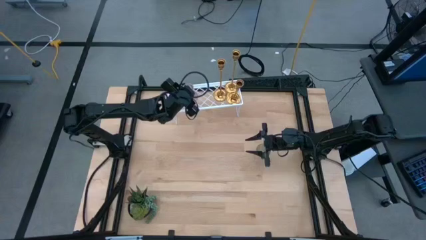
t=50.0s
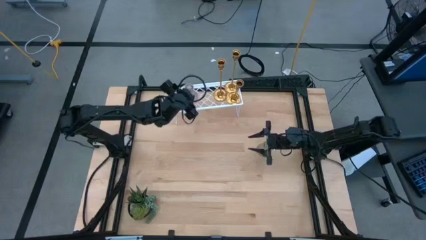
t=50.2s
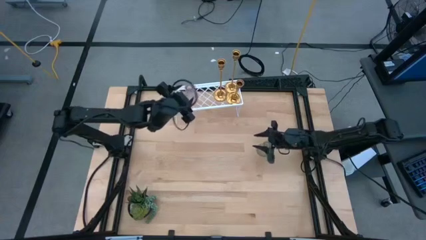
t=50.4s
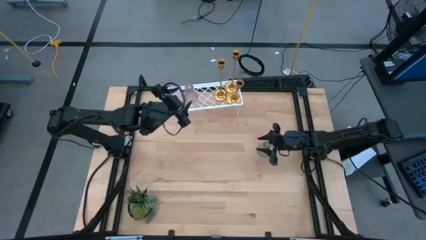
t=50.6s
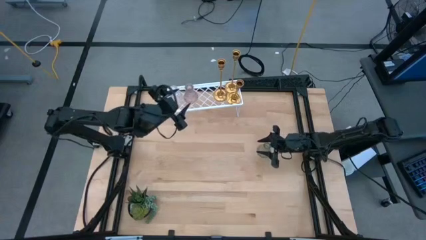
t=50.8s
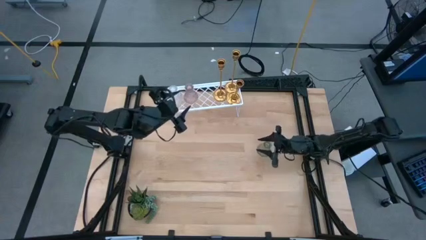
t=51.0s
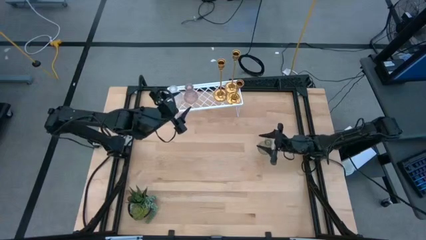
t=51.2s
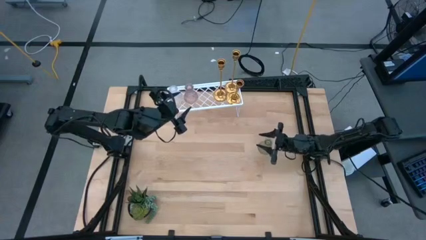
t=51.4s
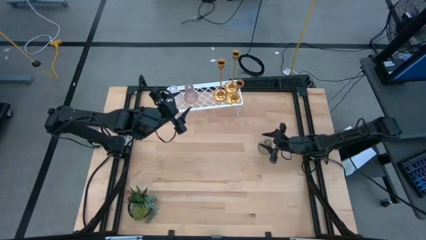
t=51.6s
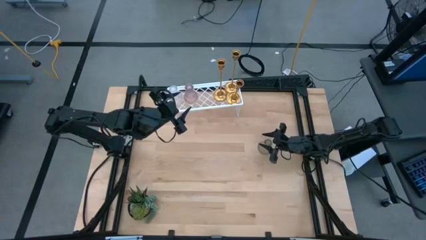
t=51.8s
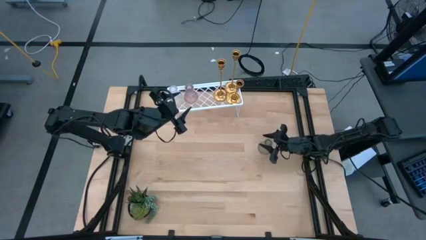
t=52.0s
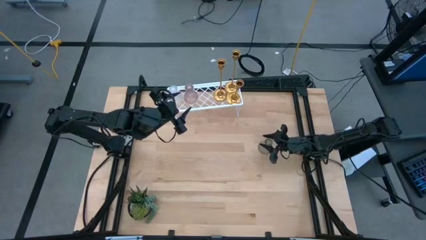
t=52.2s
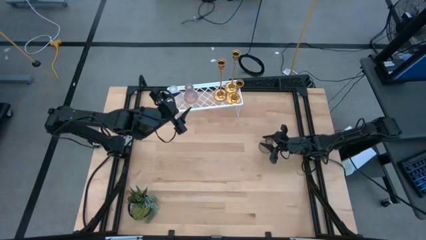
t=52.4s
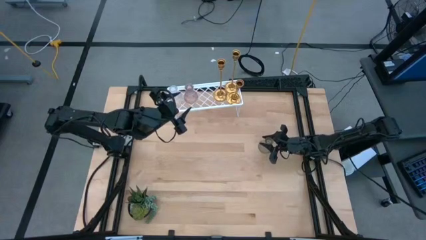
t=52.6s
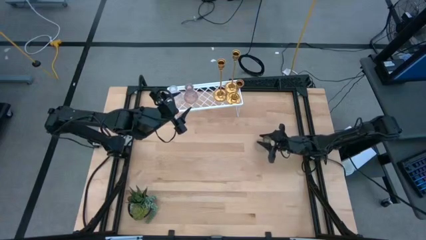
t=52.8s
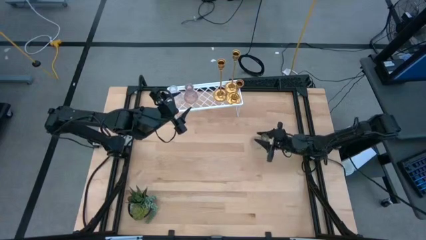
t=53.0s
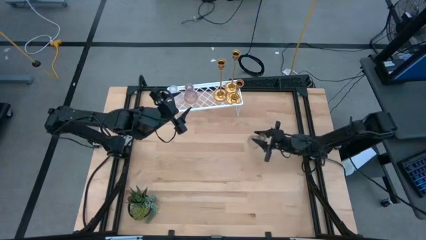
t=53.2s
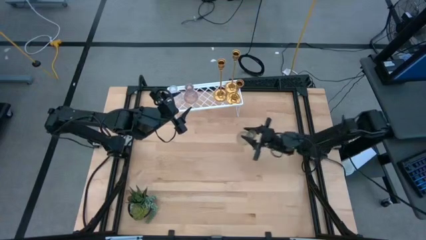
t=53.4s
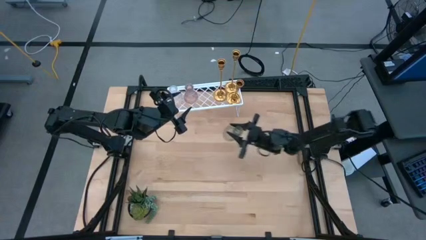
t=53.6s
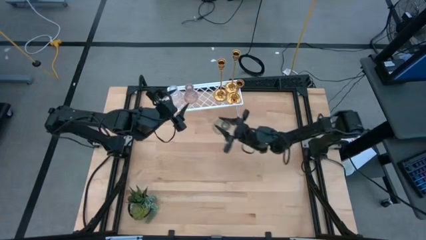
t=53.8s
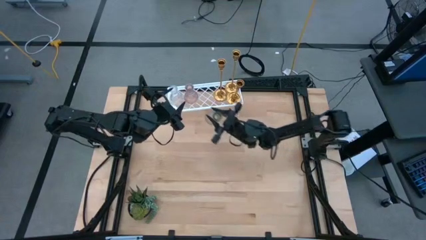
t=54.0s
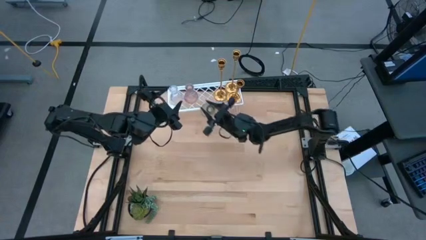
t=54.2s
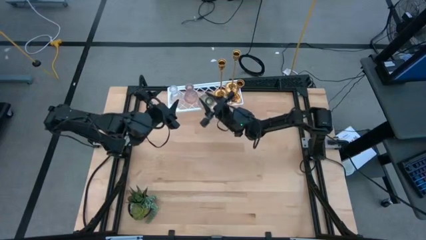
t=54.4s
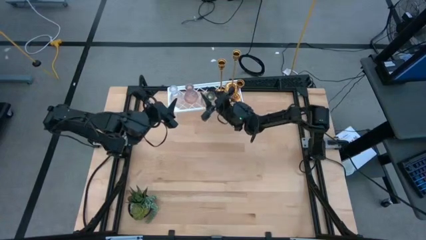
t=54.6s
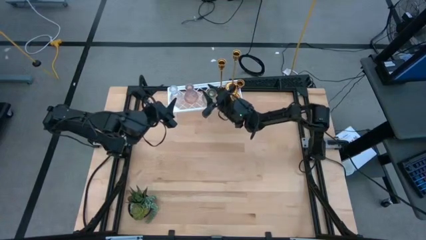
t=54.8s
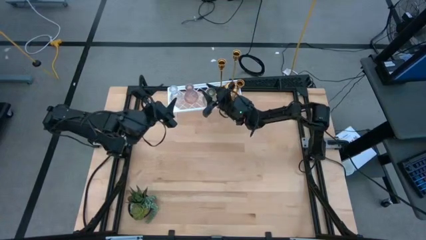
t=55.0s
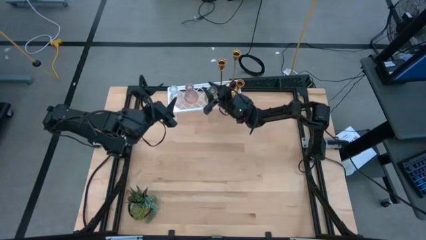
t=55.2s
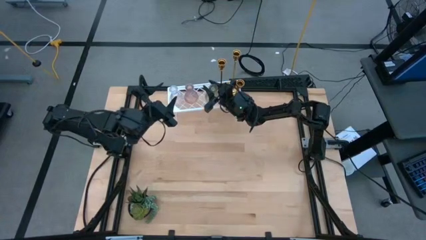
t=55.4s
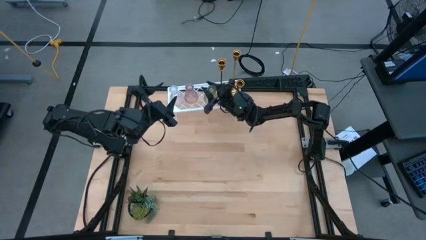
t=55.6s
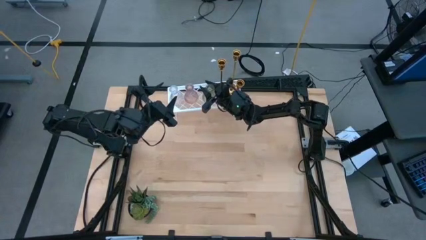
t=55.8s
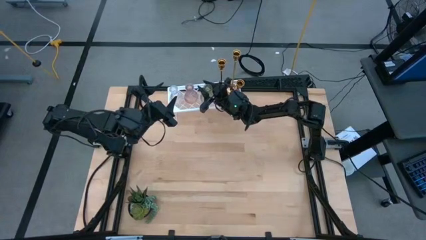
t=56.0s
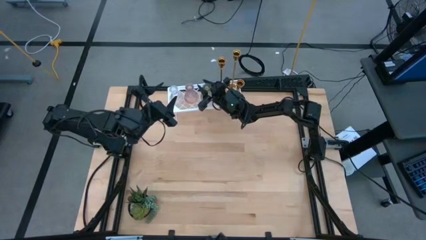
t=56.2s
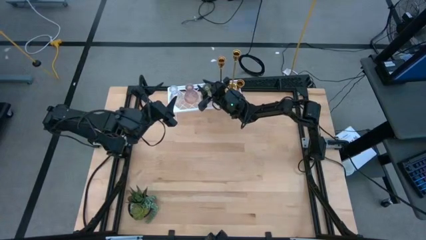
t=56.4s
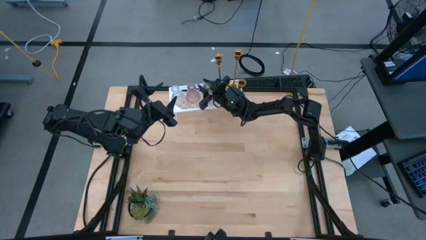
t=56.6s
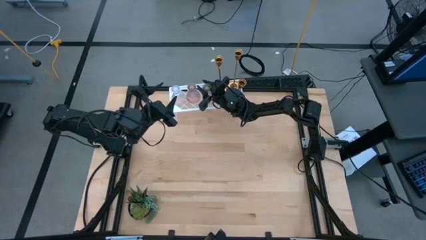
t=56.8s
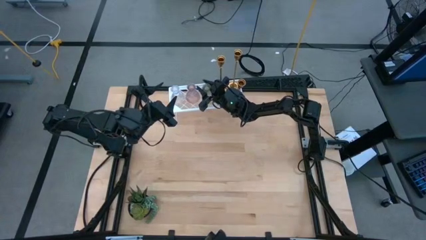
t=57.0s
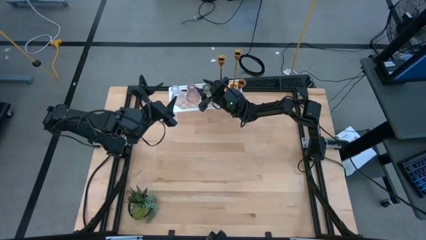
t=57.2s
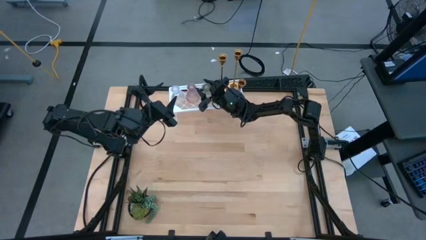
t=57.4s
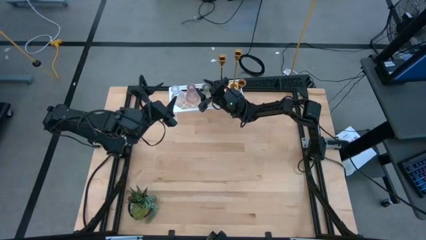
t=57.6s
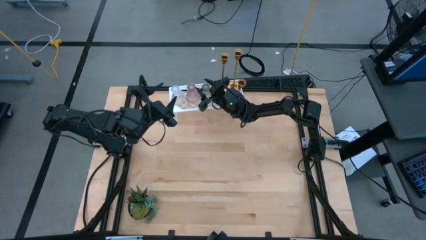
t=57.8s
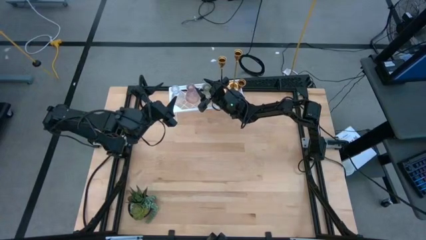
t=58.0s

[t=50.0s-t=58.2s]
Task: Pick & Place candle stick holders
Put the green glass candle holder on the shelf

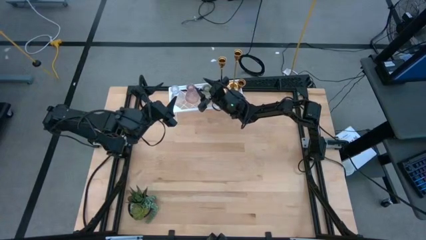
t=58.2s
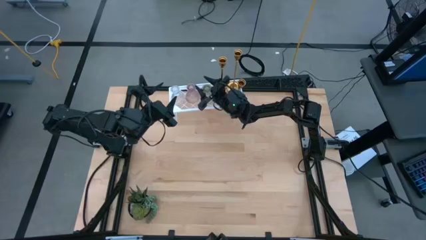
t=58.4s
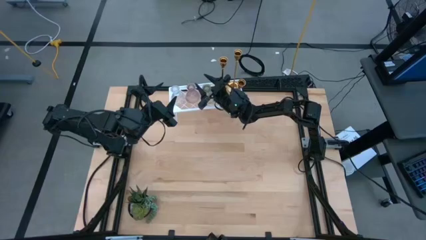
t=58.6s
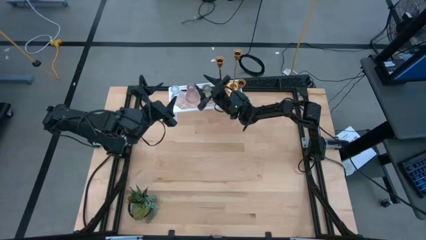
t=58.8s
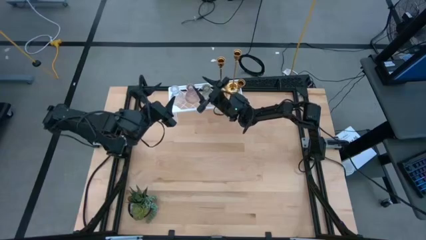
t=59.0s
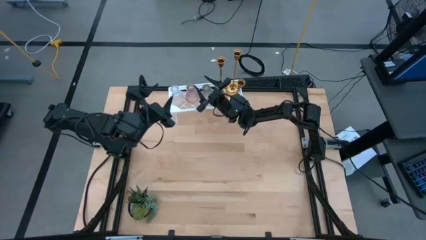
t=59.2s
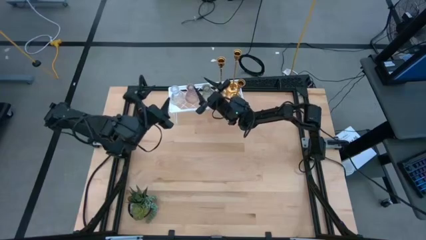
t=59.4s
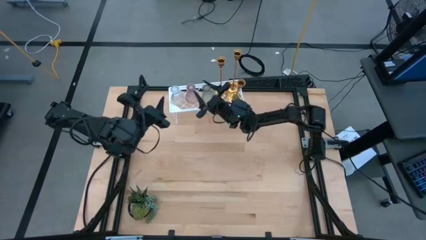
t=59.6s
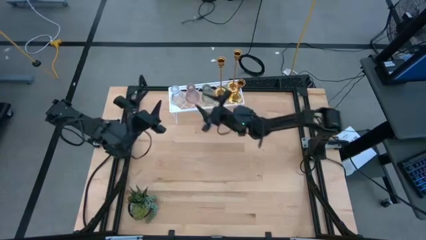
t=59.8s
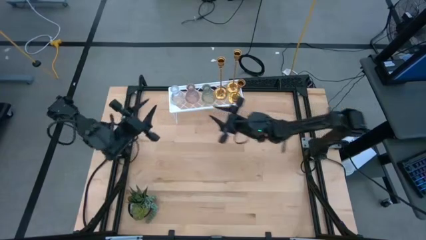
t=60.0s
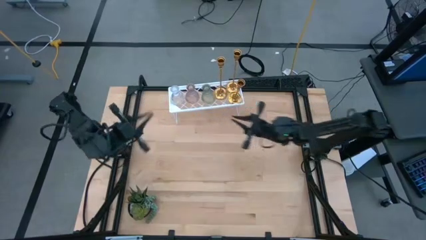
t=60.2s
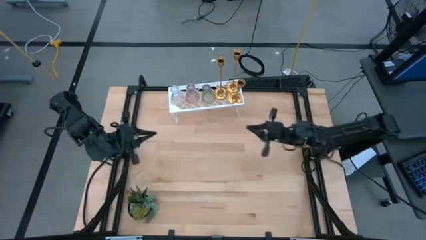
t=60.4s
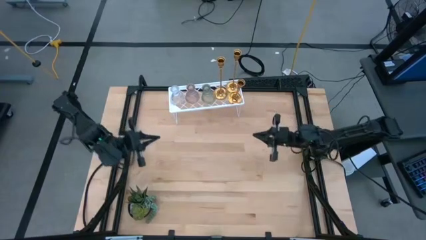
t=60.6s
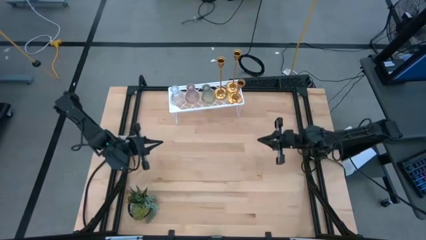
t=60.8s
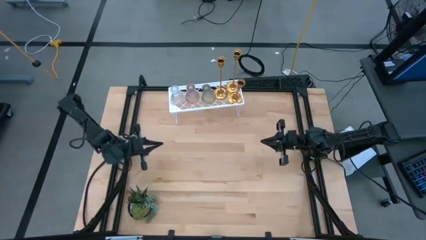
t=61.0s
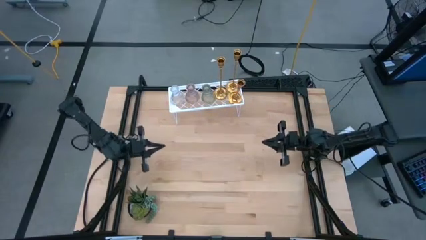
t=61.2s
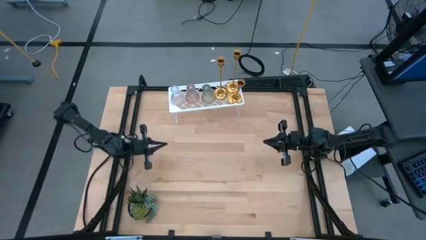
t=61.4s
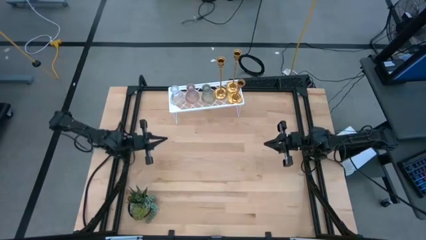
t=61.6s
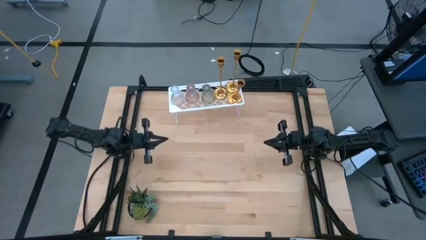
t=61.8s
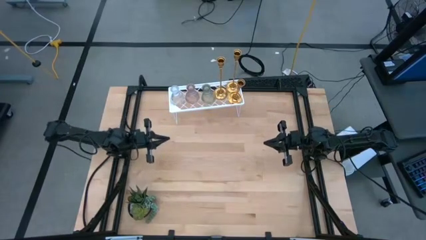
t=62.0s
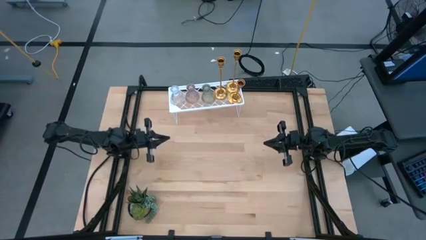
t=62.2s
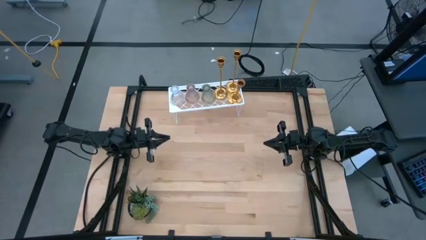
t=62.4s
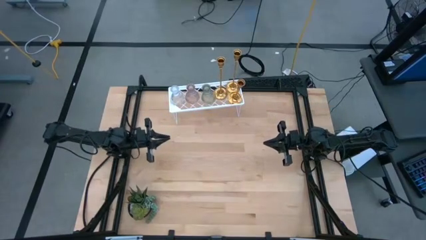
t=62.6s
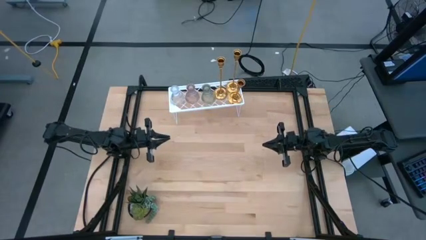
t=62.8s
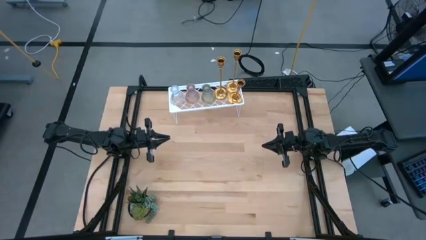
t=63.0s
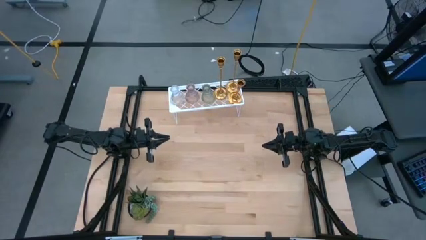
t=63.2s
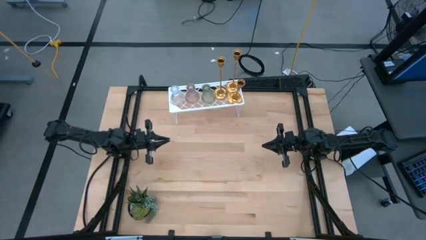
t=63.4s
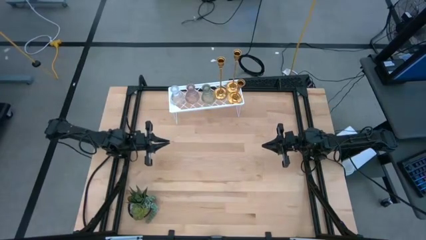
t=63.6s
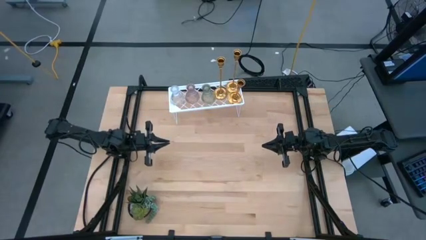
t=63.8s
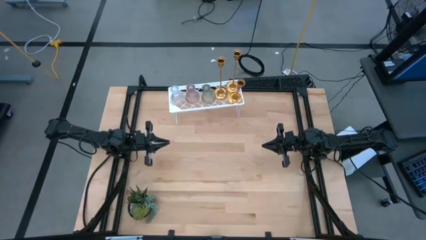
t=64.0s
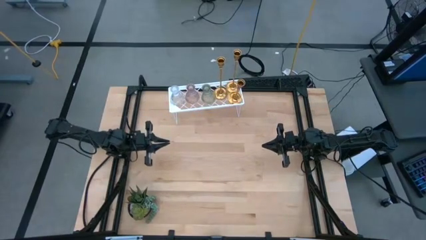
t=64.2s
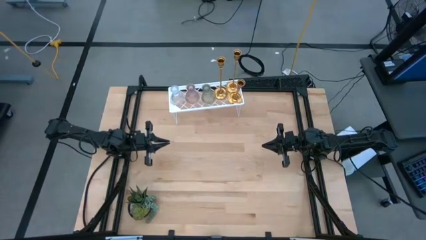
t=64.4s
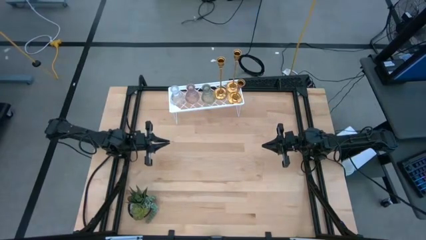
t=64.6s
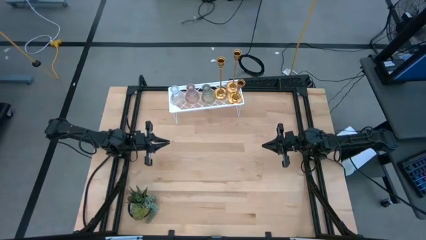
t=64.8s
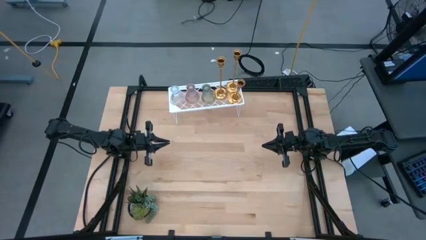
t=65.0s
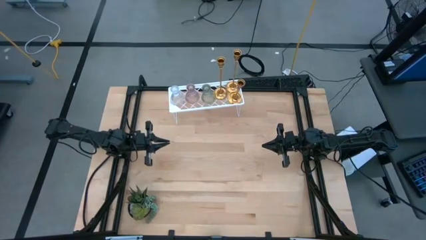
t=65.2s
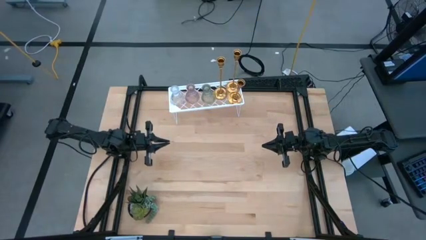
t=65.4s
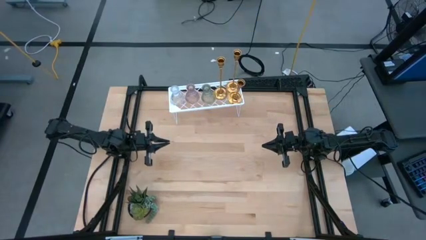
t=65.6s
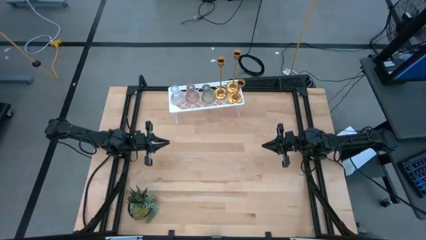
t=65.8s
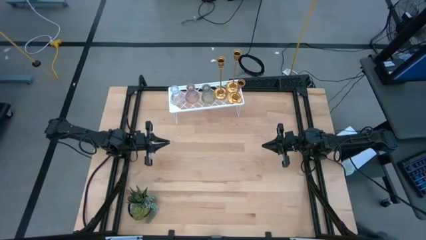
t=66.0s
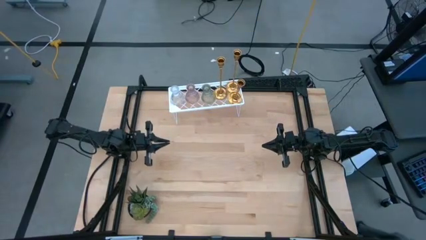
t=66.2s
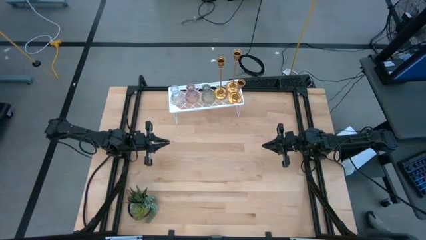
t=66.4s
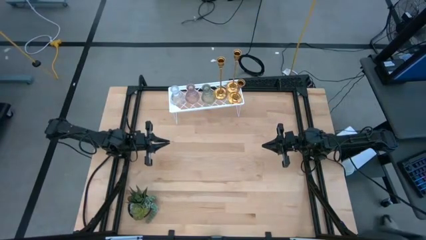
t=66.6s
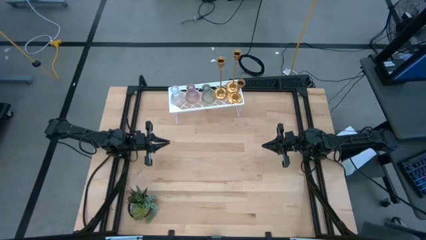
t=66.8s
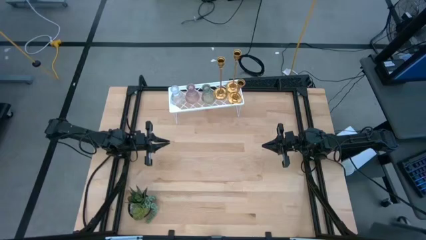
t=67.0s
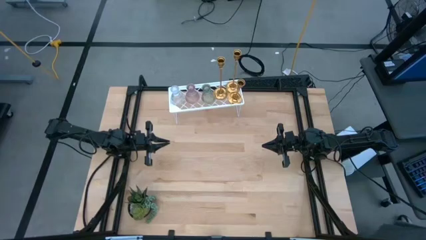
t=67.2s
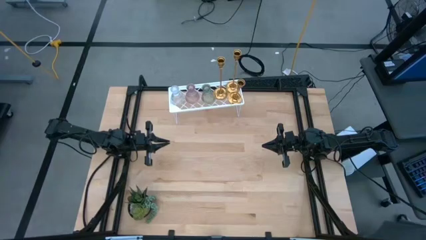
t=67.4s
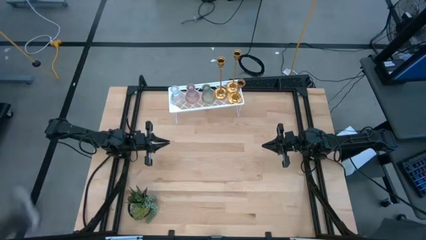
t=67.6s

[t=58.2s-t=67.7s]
Return to Home Position
